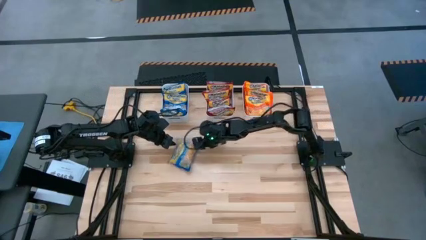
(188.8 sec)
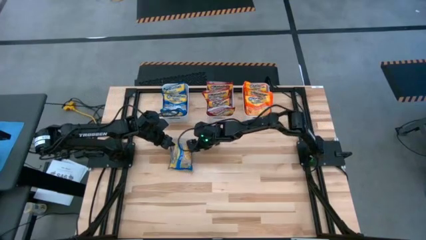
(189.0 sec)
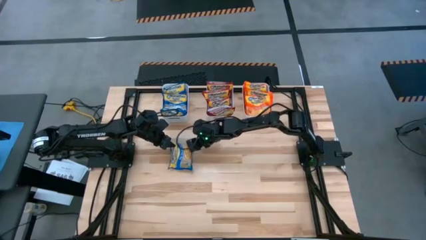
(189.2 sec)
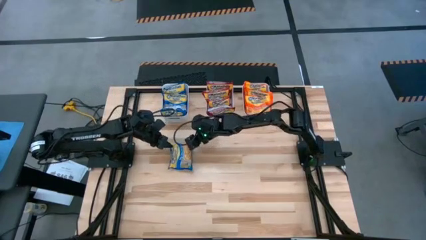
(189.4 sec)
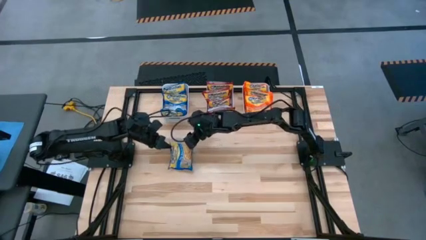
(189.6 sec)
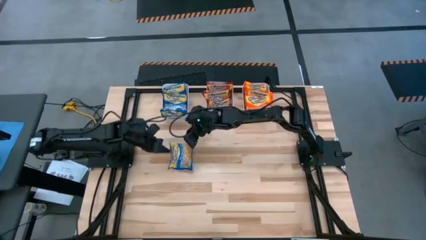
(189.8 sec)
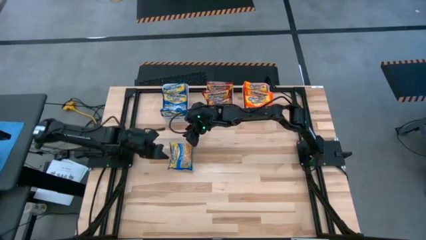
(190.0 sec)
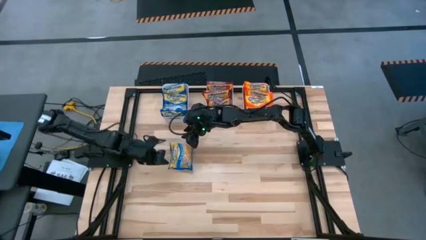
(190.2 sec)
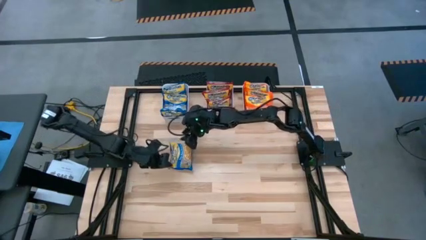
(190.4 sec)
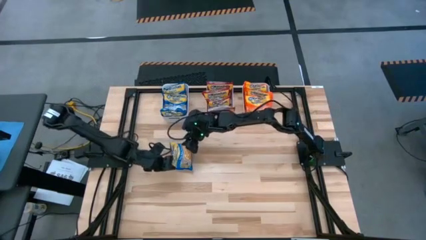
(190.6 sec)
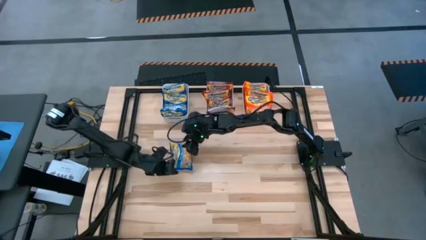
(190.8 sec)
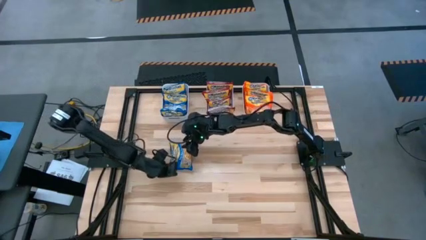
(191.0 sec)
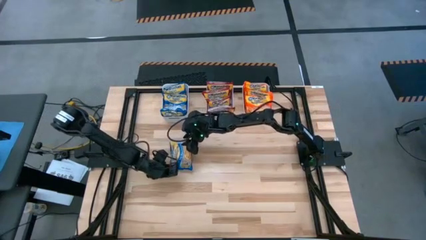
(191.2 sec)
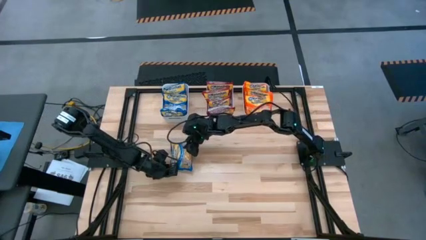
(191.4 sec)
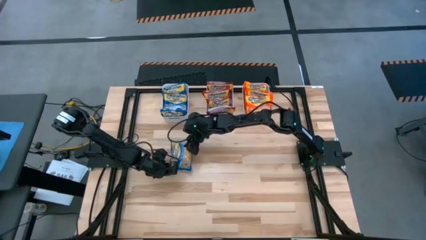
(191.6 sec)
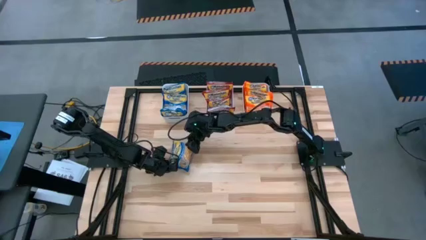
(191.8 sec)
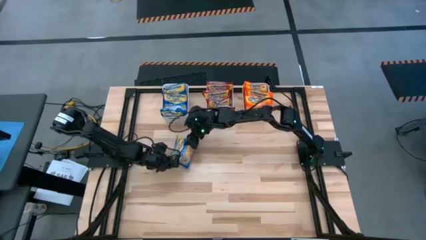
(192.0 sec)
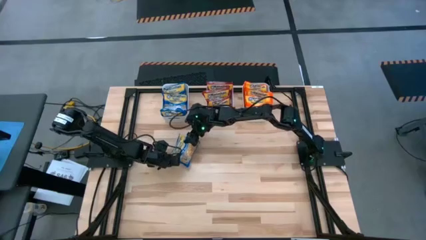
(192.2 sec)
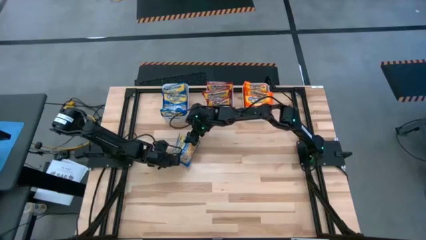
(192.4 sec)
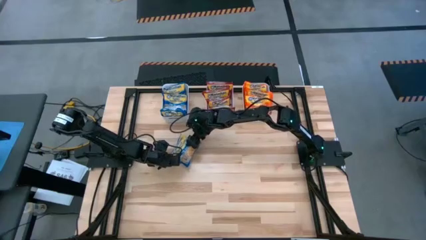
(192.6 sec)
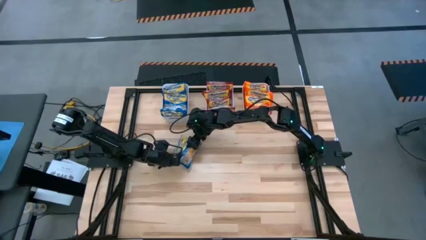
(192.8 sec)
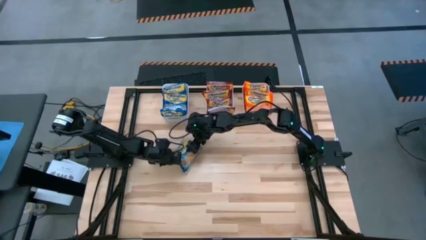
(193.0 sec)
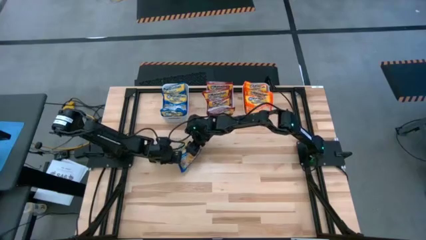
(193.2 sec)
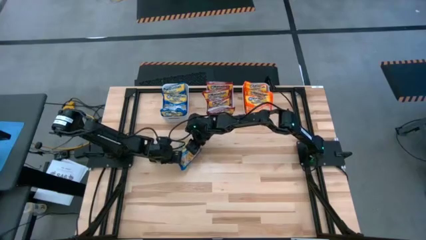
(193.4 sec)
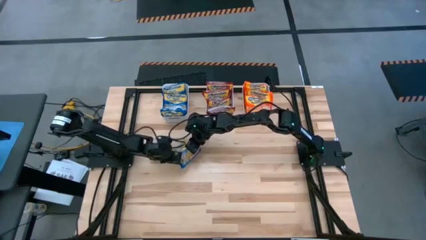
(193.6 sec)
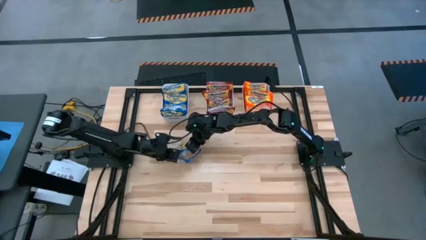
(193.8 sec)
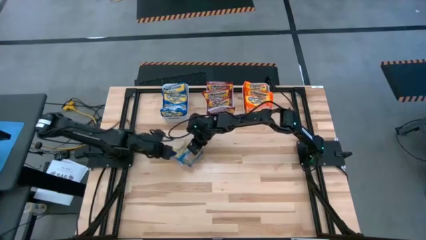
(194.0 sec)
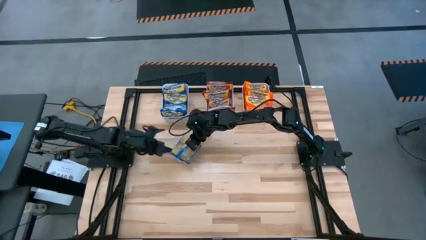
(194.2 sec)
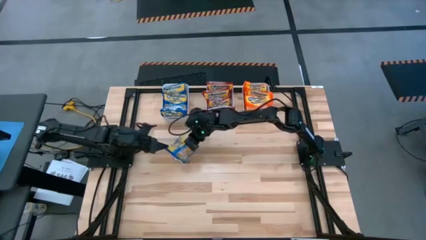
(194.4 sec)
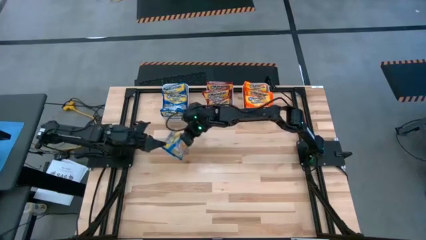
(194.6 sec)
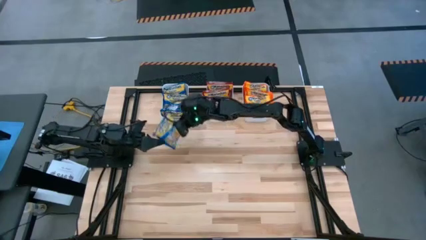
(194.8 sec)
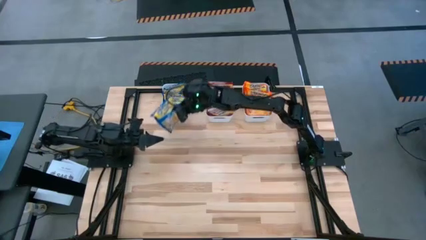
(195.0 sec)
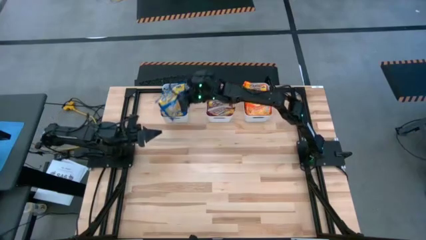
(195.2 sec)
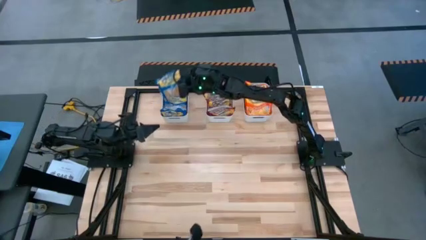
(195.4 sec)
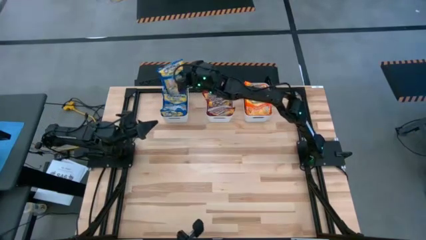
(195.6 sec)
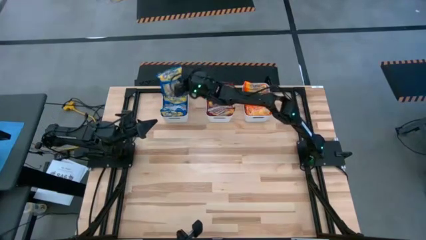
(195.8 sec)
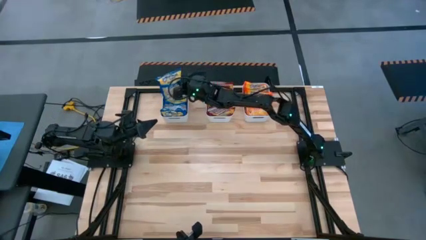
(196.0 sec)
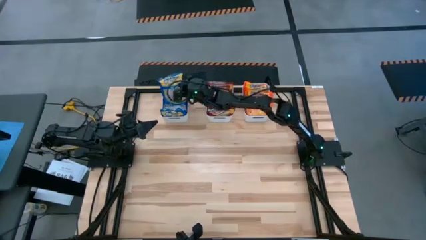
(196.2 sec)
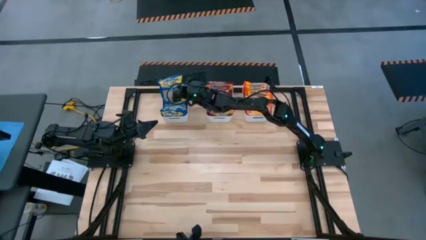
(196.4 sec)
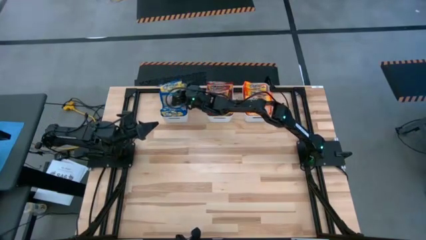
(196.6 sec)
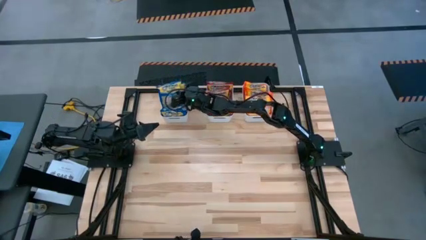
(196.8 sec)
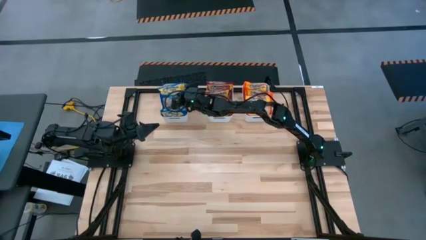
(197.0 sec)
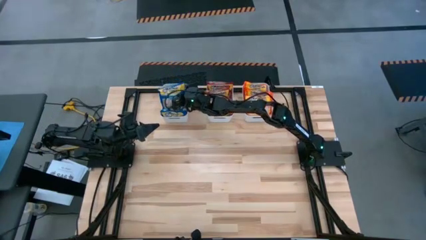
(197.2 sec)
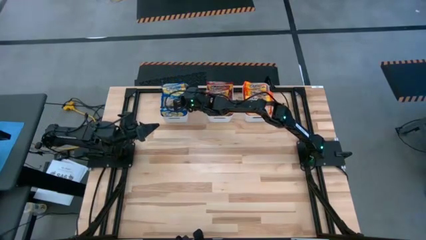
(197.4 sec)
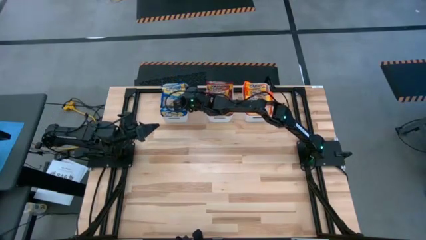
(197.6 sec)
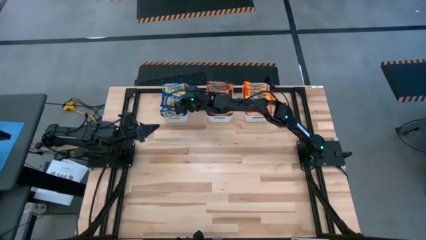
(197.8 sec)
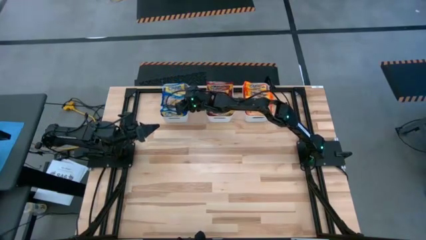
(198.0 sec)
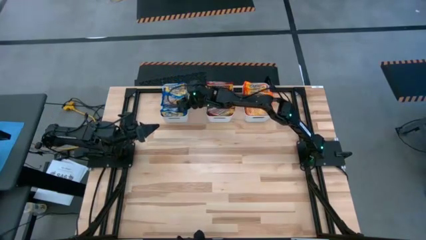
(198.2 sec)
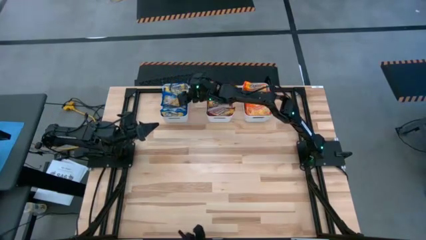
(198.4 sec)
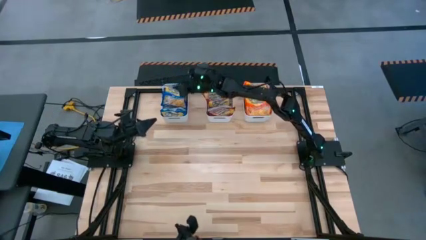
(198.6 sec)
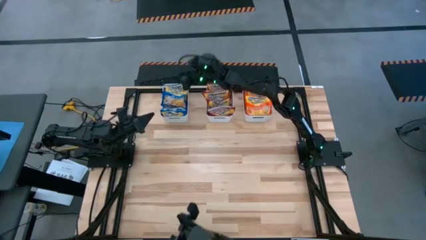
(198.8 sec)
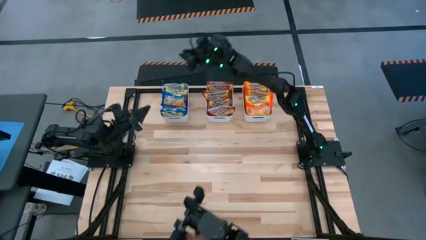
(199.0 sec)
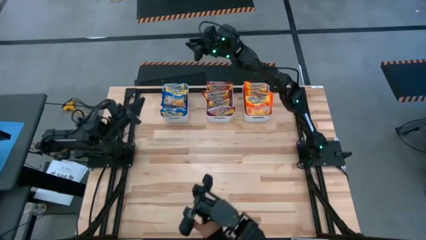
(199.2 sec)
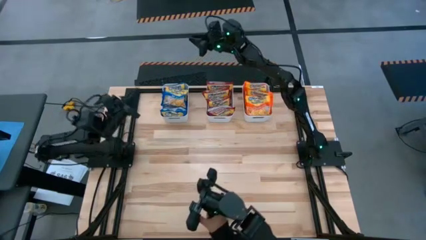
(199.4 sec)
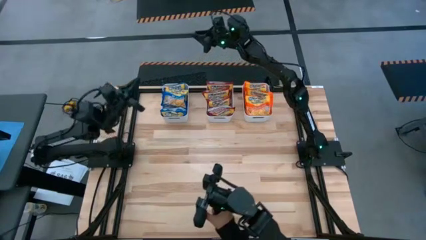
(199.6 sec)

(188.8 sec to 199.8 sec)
Task: Sort Maruchan noodles
Put the blue noodle pack into the left white bin
